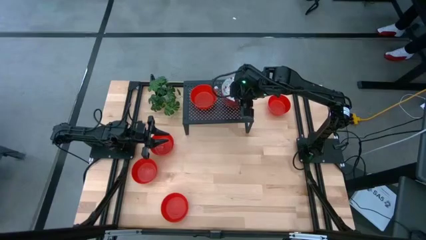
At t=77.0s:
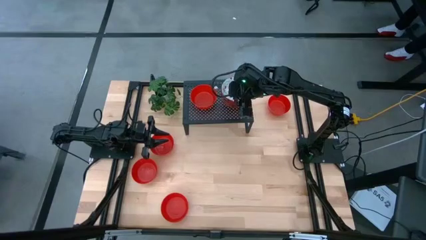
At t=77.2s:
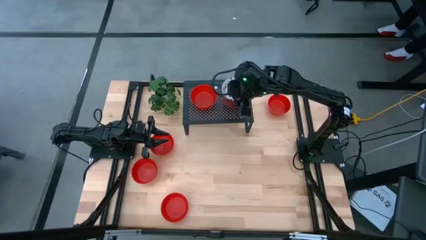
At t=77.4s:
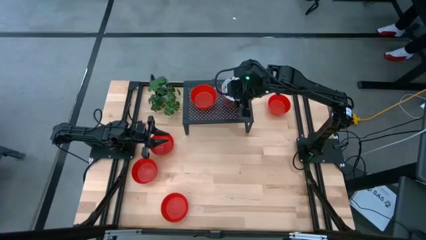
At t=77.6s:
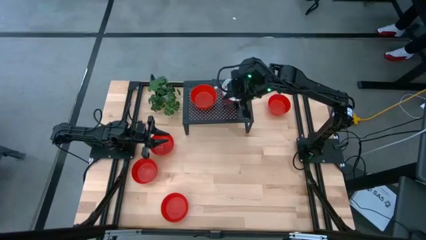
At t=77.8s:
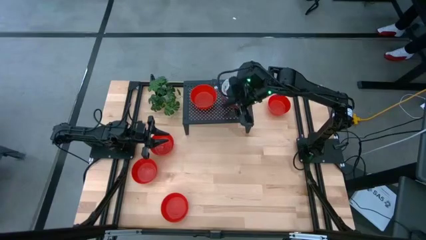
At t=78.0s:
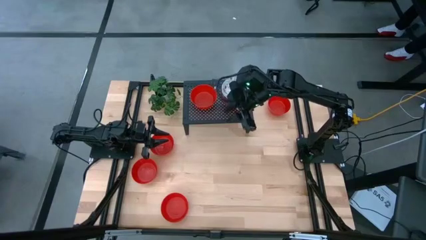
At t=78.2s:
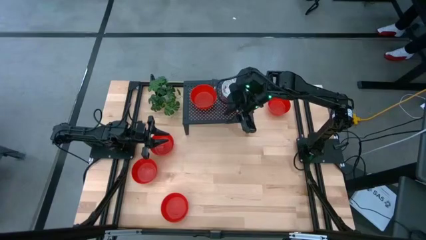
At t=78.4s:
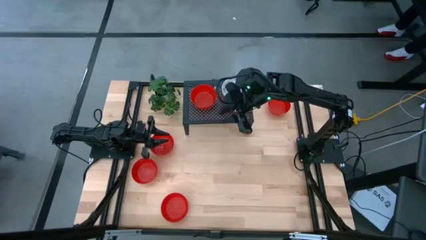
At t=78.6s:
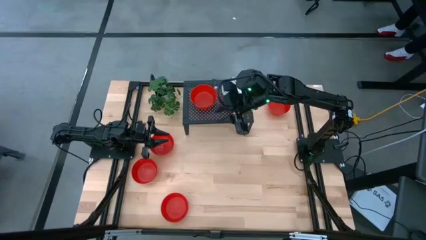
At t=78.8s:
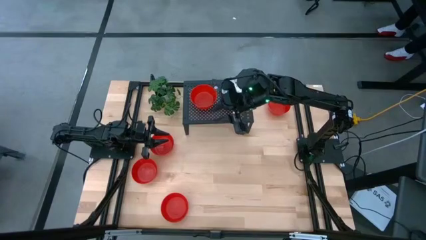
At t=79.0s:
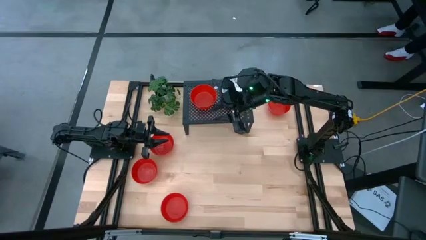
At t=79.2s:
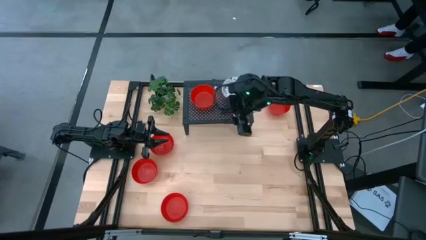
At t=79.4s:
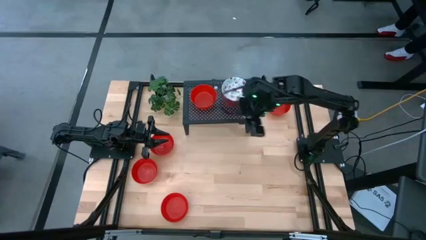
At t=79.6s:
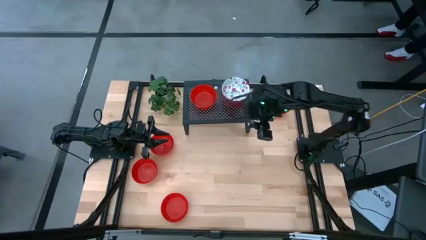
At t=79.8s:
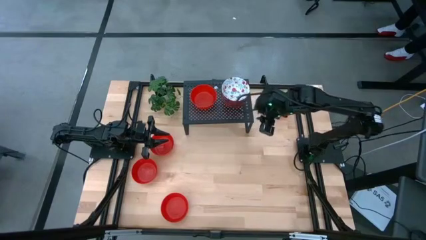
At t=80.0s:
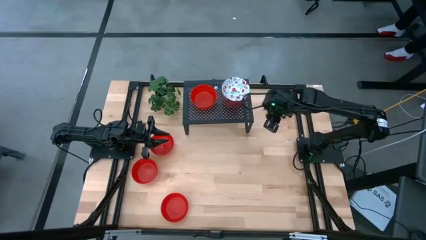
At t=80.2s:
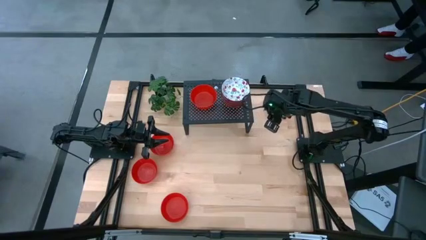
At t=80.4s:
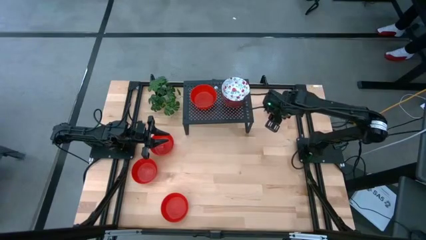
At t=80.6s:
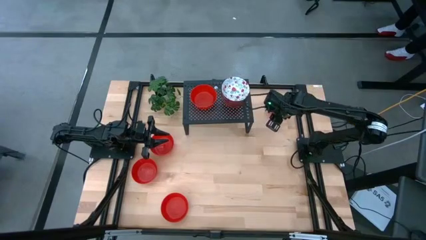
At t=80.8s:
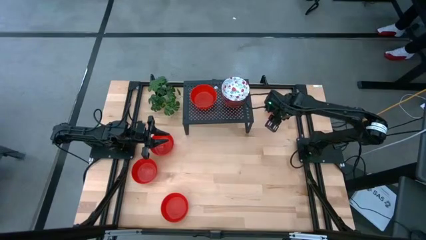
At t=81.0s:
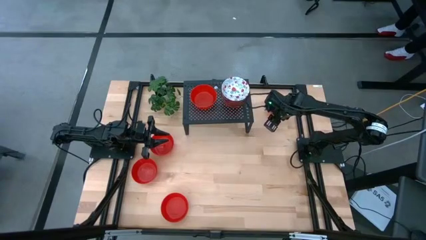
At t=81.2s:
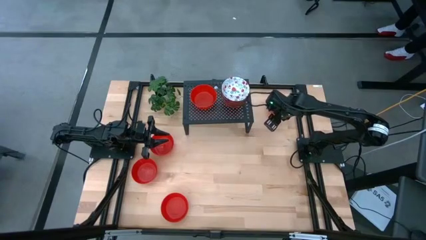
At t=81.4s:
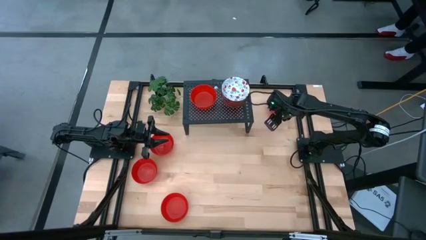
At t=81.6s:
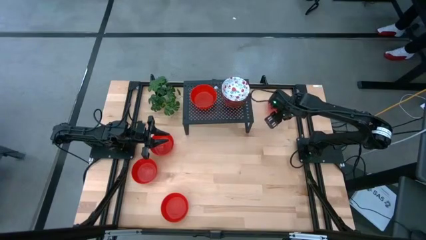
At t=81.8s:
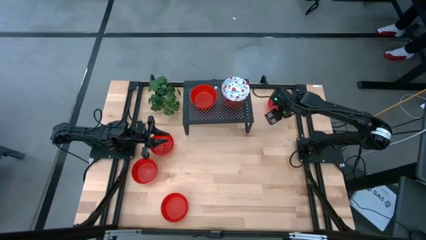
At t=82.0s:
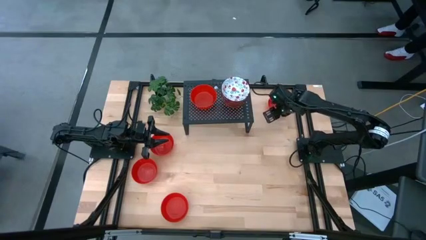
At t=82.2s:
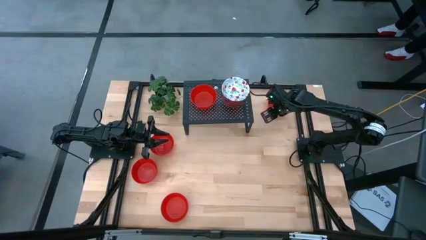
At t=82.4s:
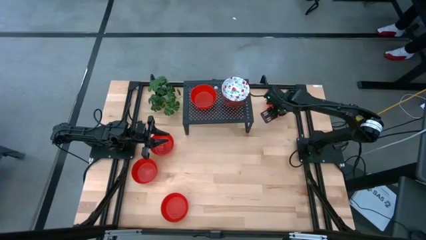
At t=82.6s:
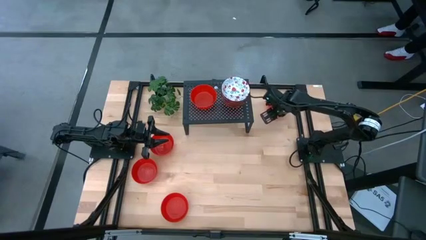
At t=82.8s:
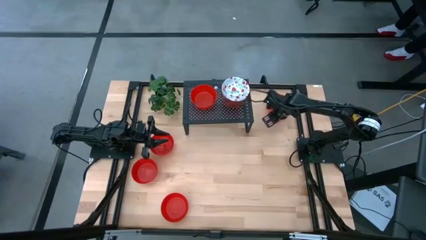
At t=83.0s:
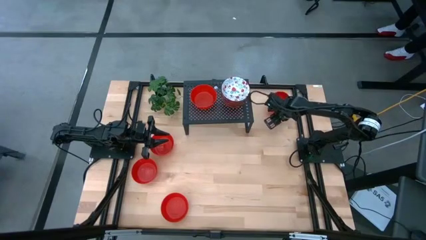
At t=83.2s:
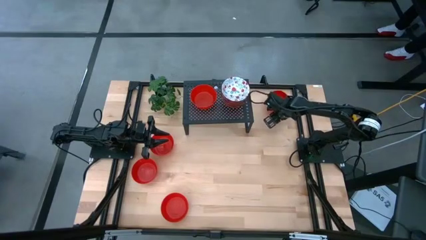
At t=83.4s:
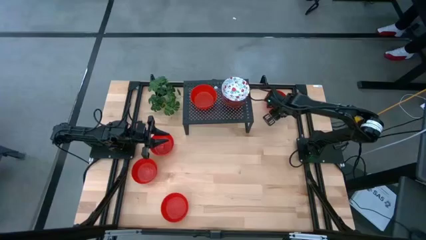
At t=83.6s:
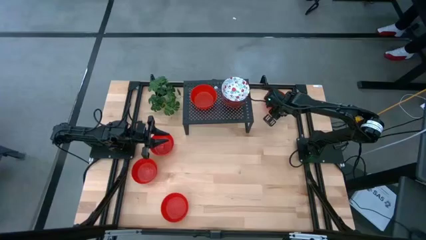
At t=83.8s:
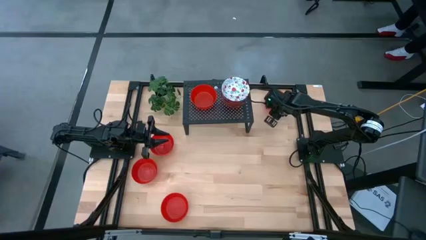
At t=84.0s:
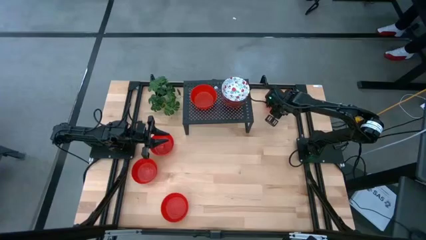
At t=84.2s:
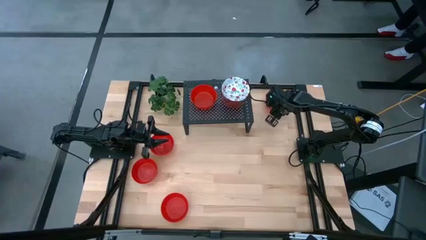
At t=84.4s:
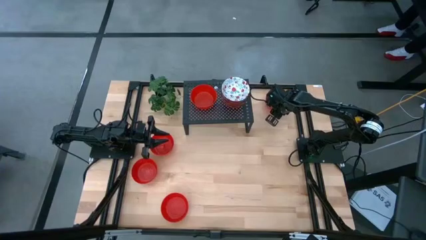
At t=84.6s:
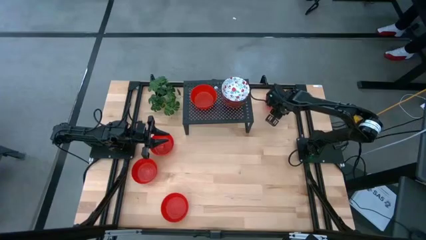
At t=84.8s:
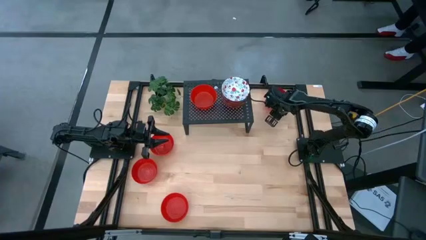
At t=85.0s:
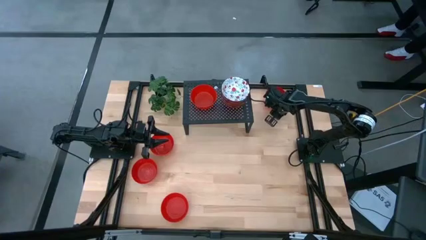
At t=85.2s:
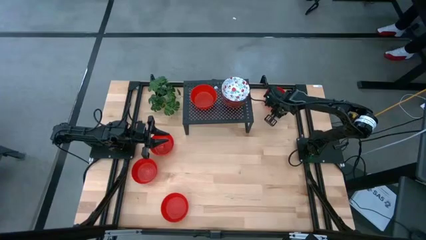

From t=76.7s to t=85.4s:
Task: Pick & Place Mini bowls
Stack the red bowl on the top of the red bowl on the shelf
